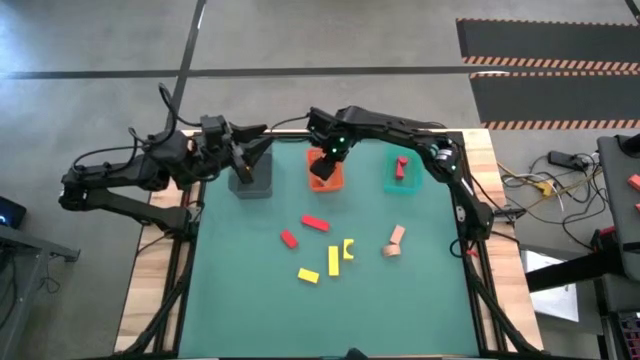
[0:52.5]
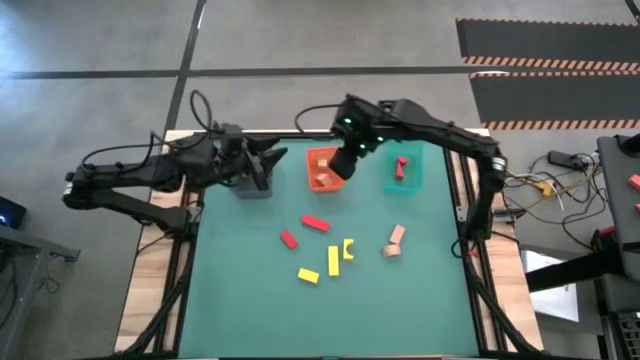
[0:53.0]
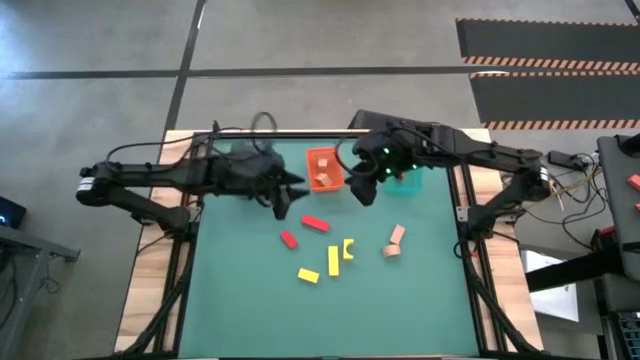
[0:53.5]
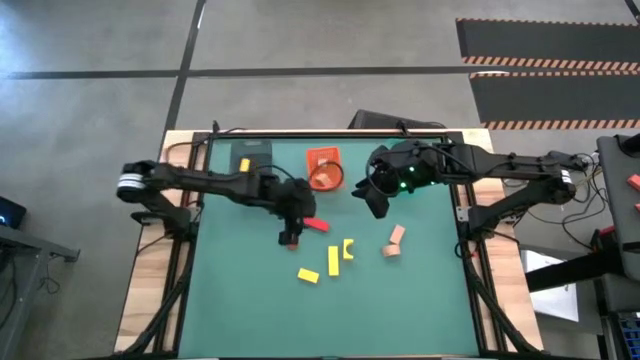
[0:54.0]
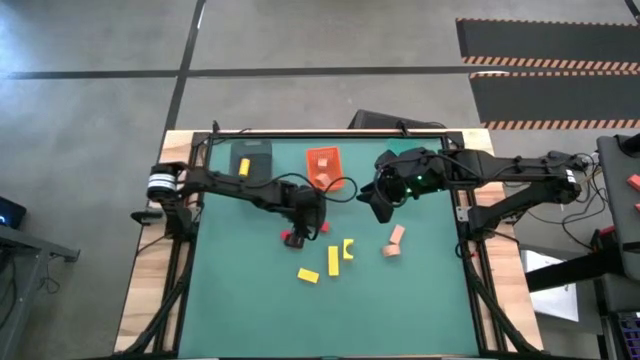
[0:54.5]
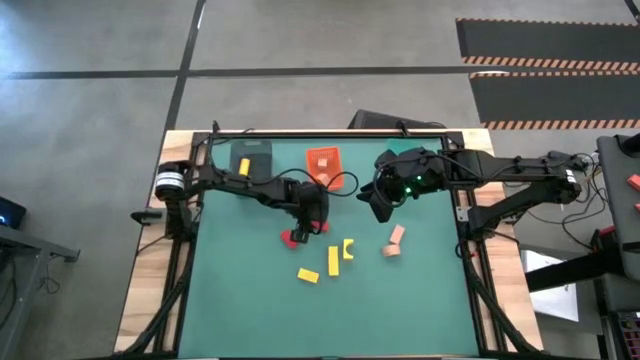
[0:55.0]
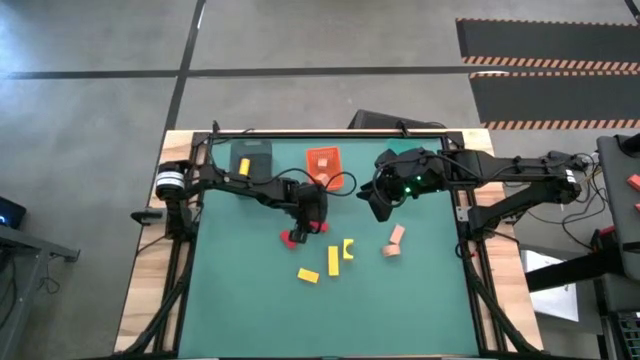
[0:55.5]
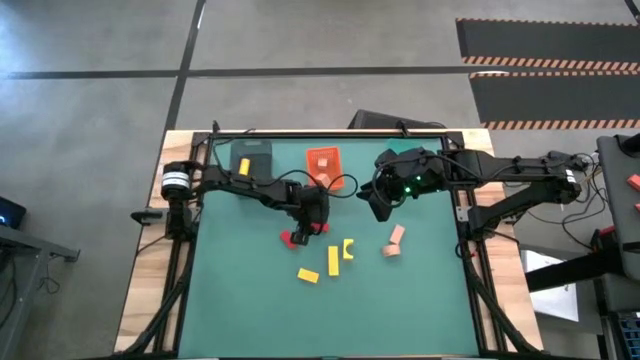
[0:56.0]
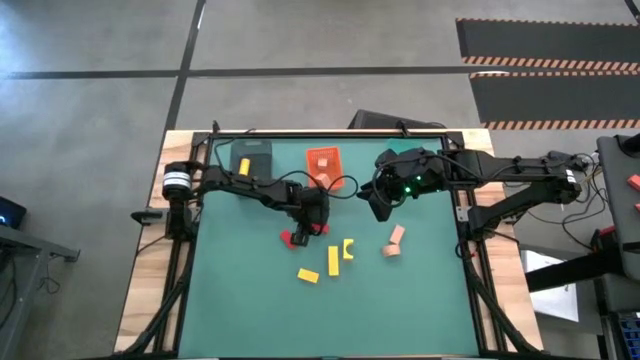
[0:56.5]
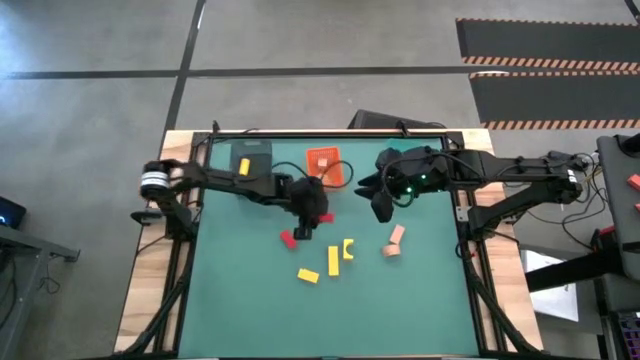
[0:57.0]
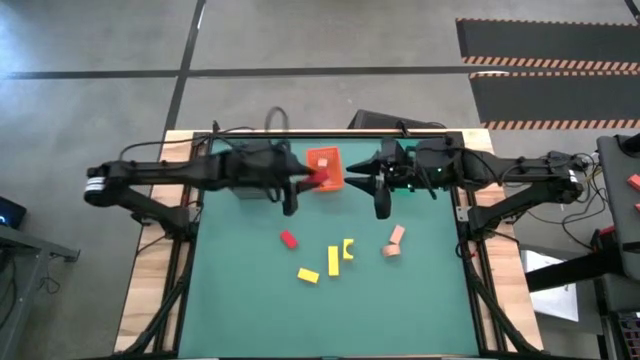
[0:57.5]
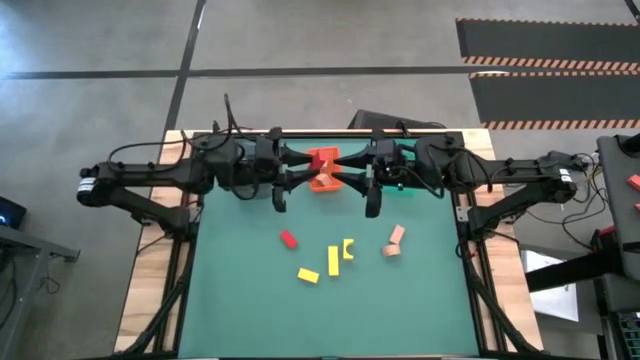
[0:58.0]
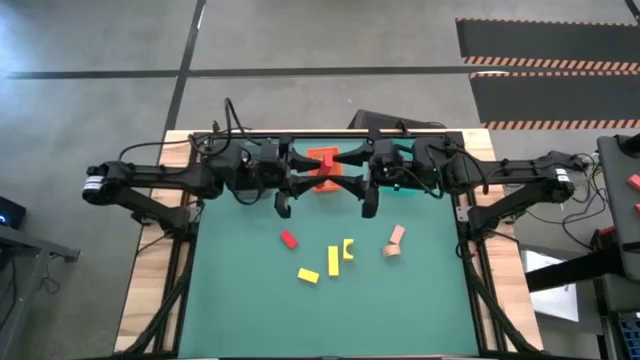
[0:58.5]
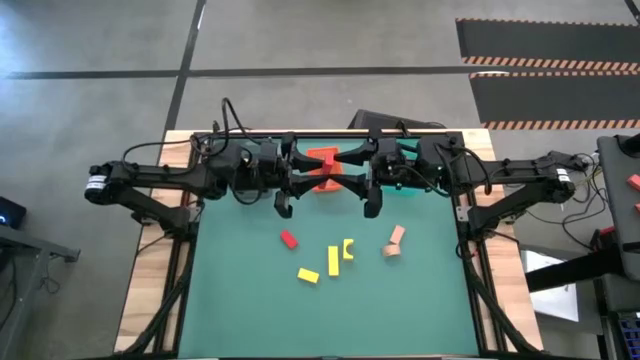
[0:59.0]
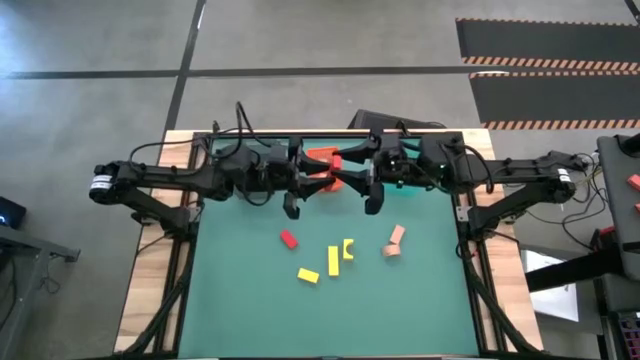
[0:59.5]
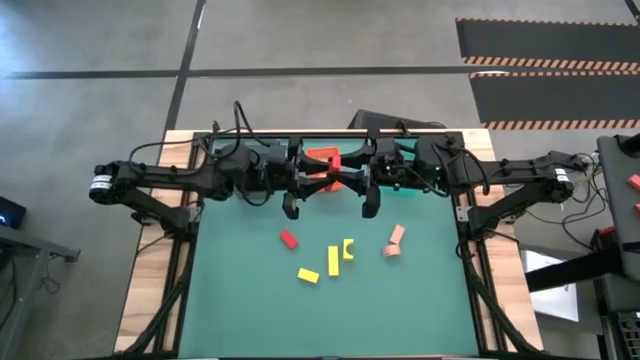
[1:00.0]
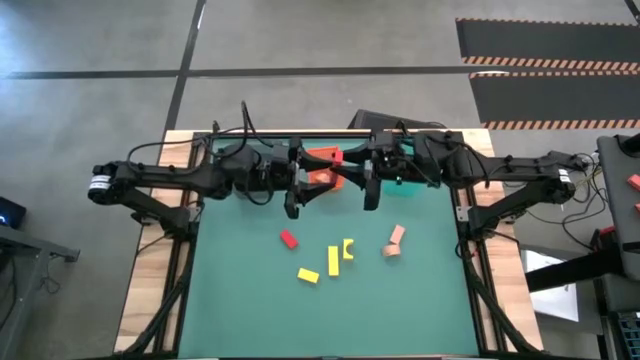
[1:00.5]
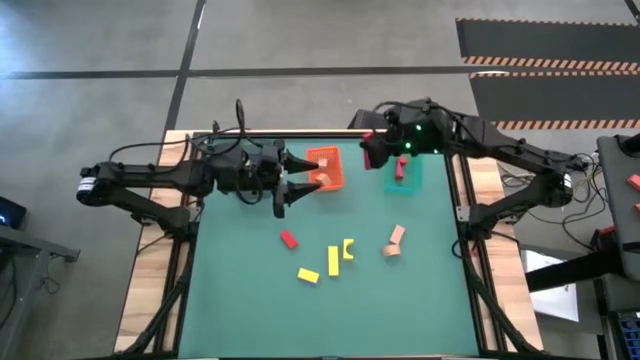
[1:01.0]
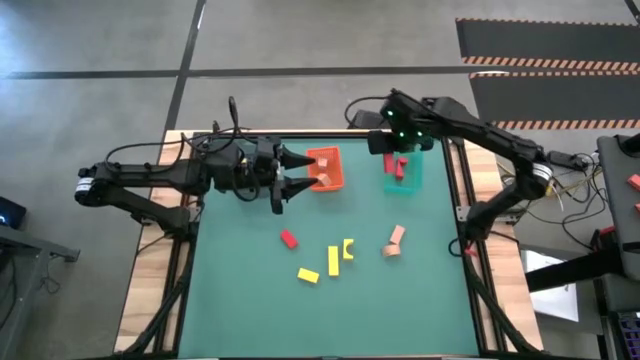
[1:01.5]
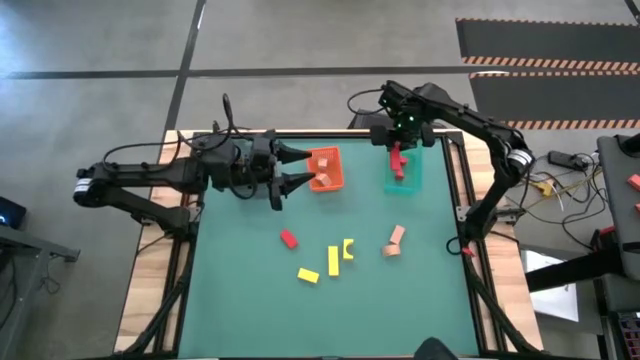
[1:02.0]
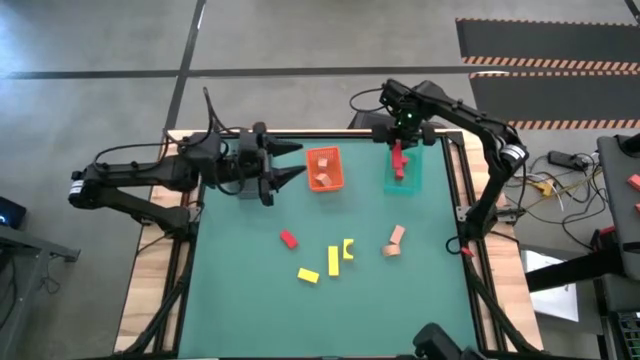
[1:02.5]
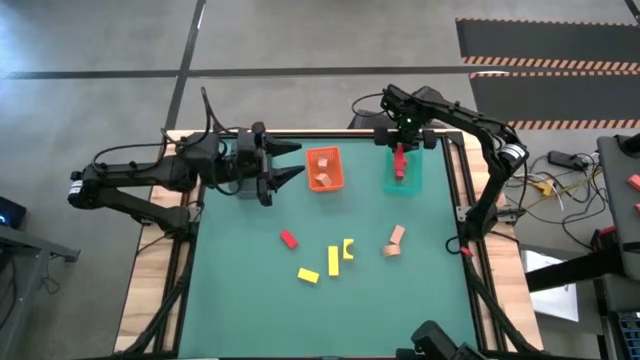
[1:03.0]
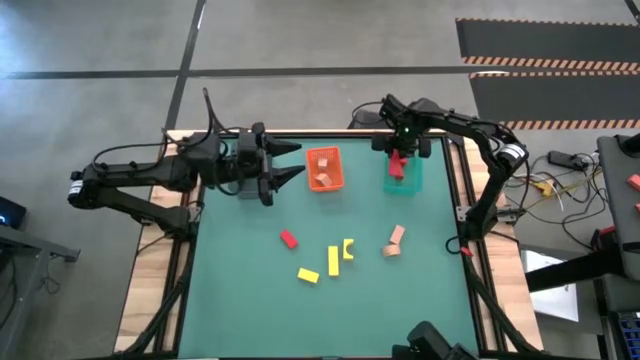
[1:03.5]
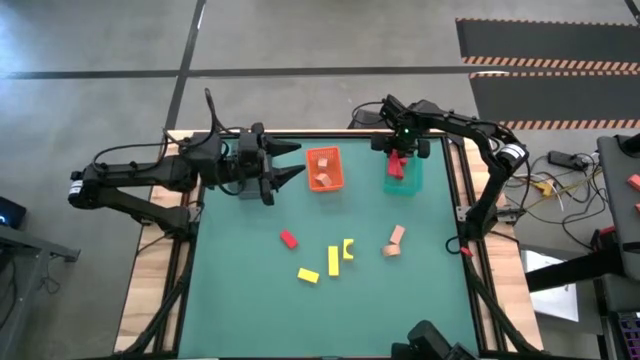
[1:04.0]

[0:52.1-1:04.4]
Task: Sort & place blocks by color
Put the red block into the green bin

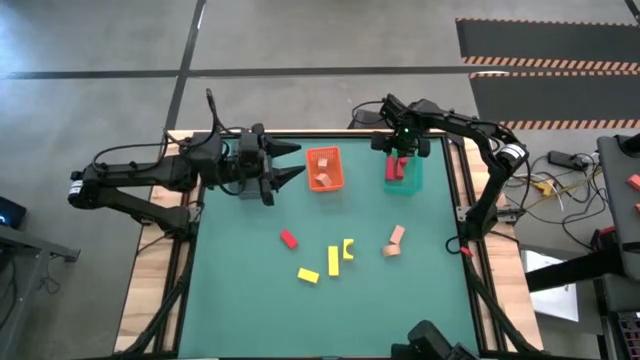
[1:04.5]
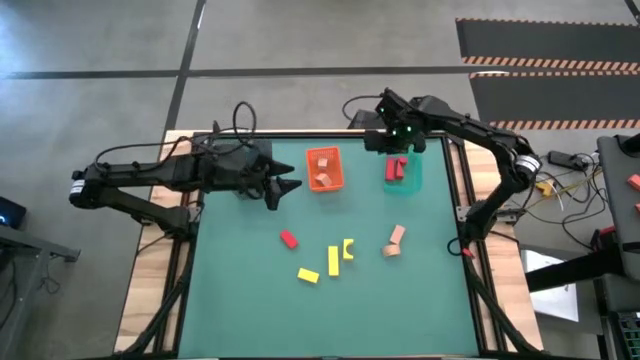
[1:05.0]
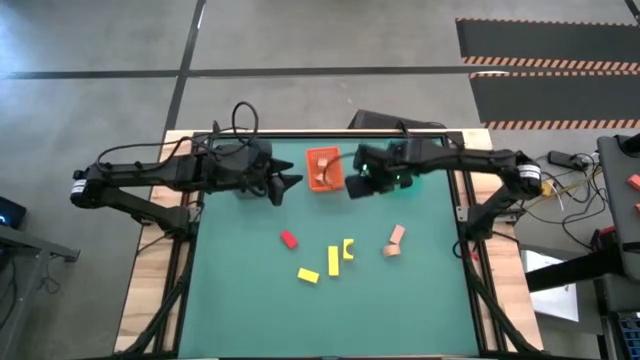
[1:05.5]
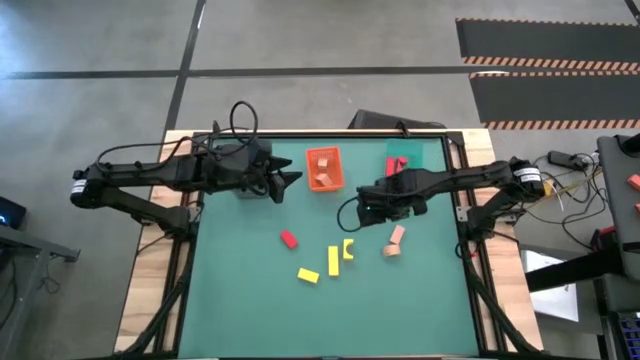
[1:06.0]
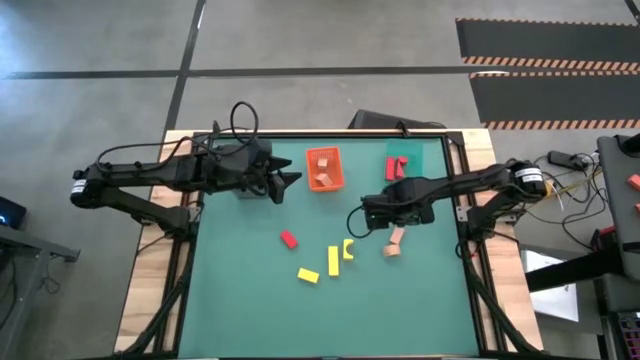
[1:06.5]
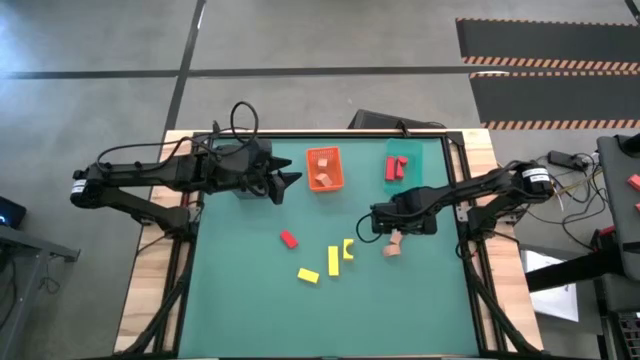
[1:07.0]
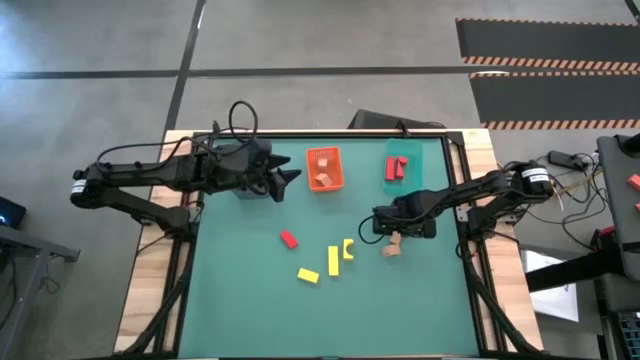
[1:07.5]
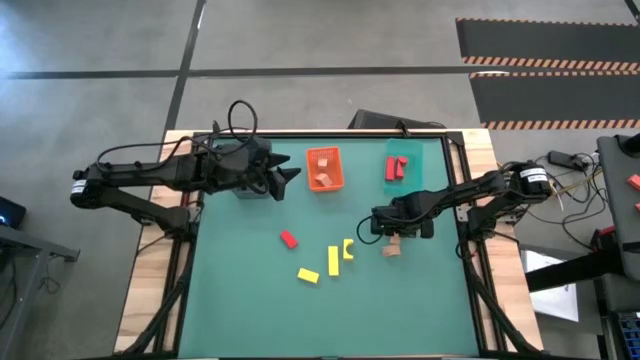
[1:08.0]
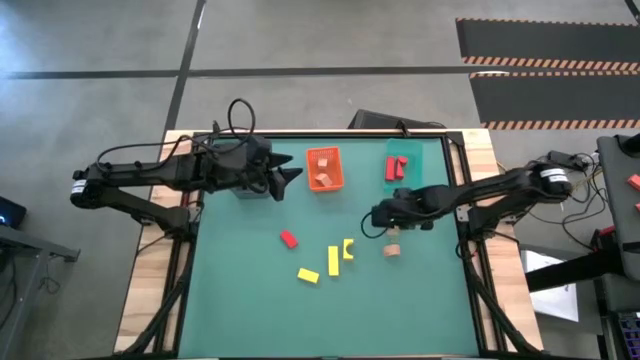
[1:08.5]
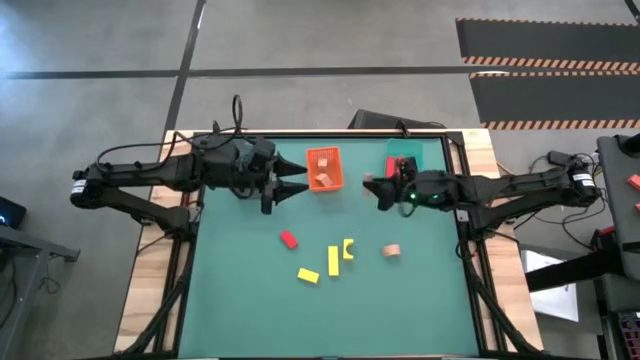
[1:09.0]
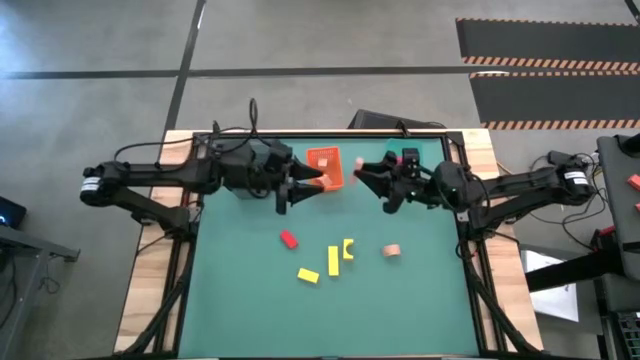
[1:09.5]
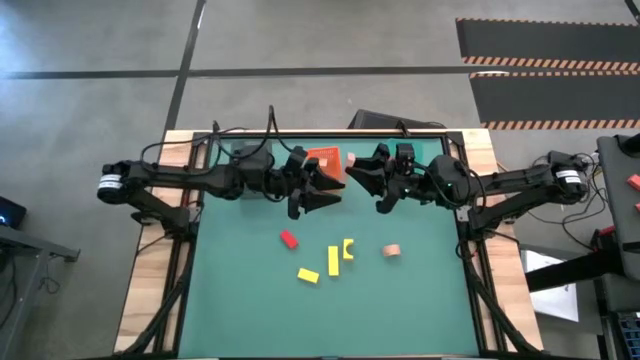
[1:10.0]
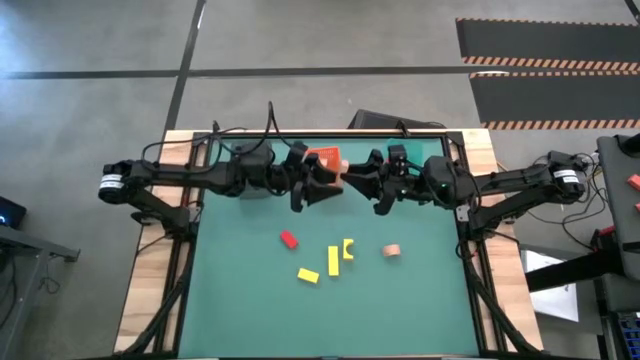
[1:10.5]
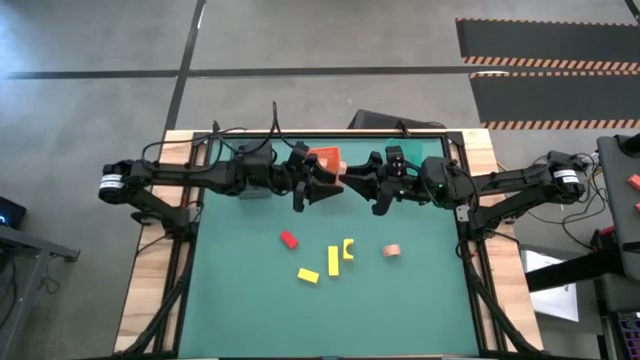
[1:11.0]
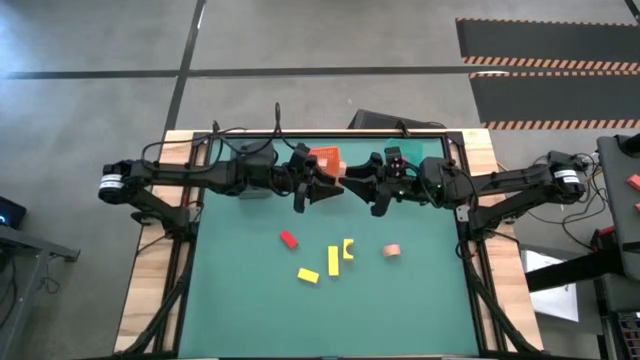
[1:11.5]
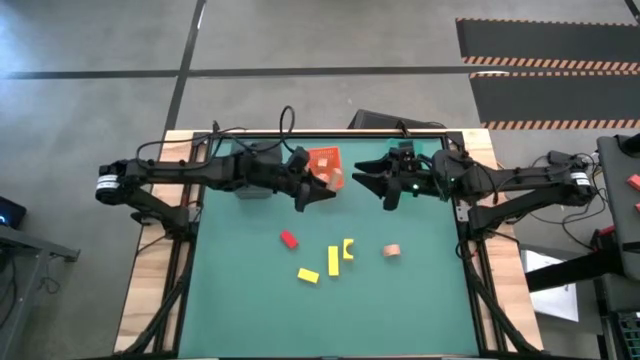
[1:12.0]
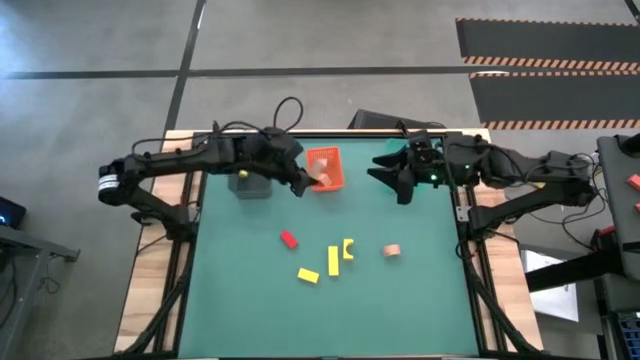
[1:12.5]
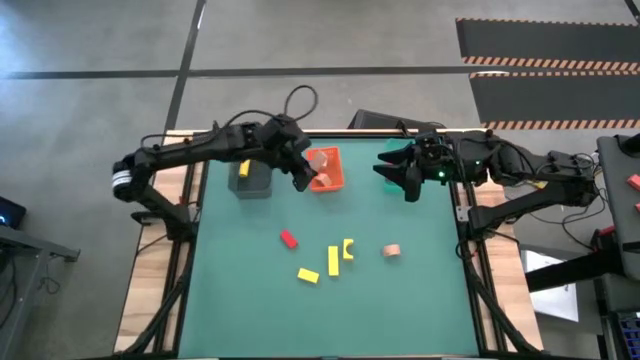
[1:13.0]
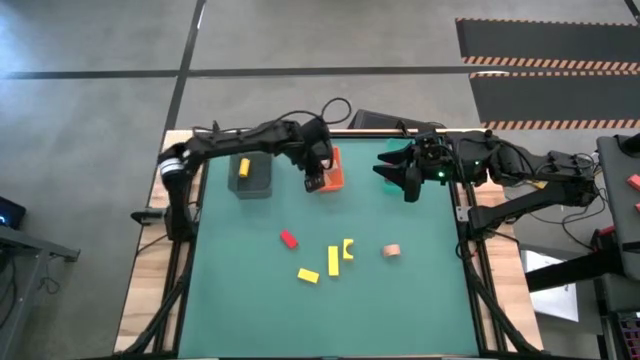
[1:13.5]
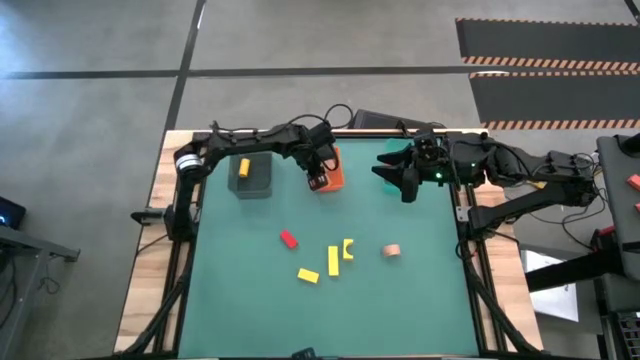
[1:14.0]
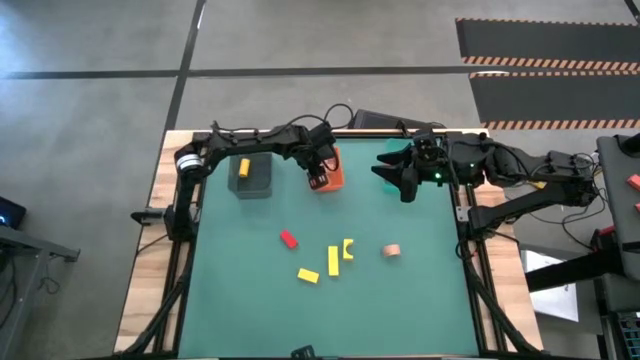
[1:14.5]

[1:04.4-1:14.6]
Put the brown block into the orange bin
